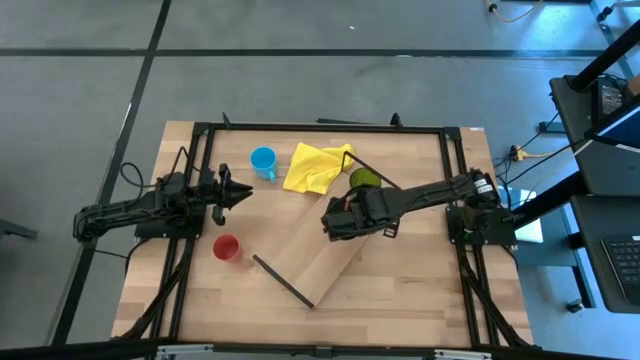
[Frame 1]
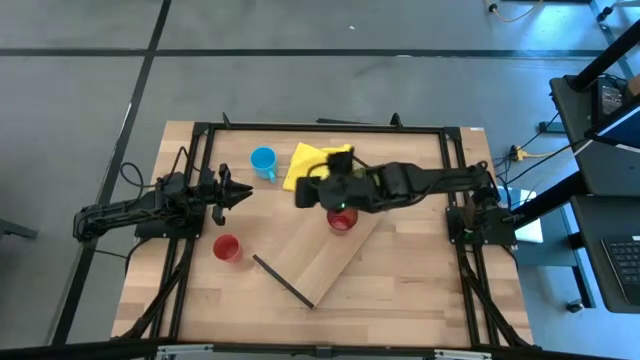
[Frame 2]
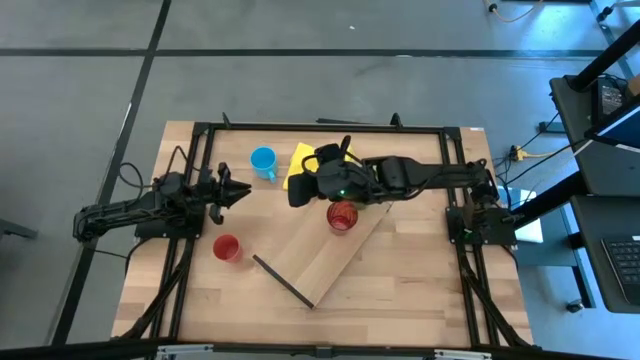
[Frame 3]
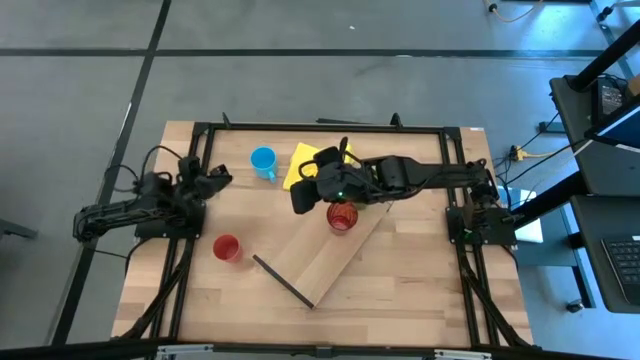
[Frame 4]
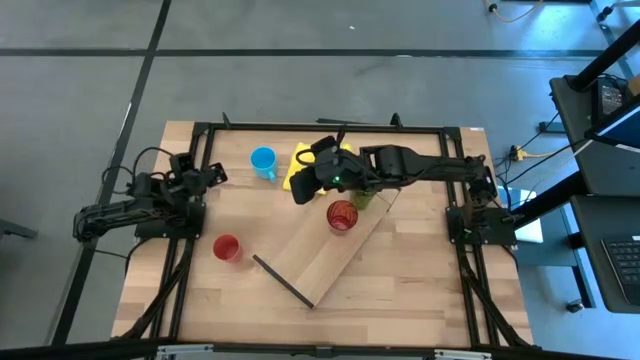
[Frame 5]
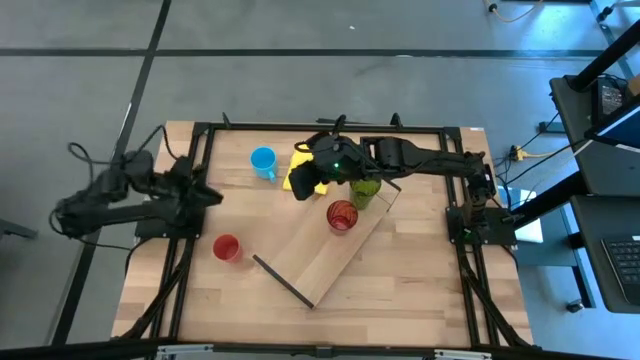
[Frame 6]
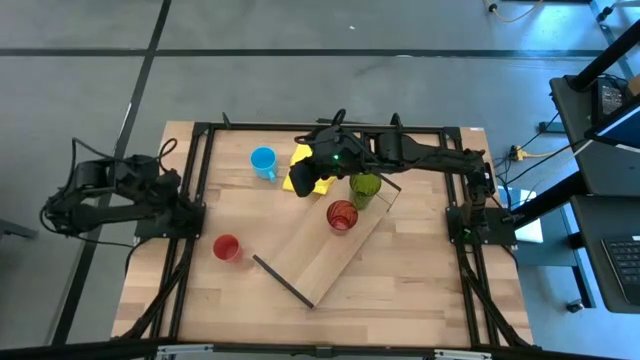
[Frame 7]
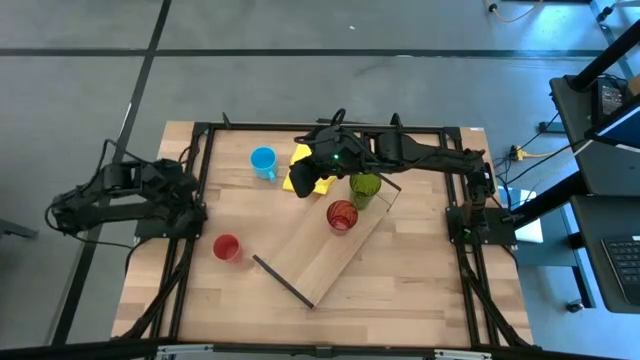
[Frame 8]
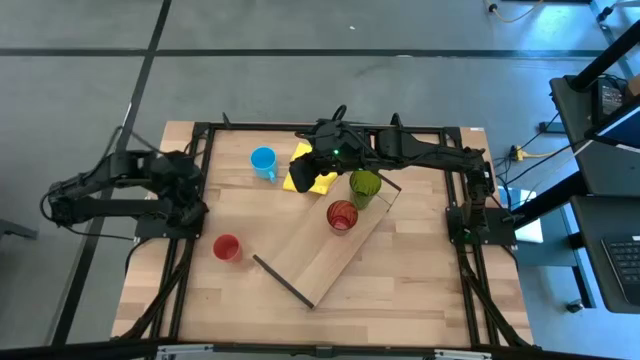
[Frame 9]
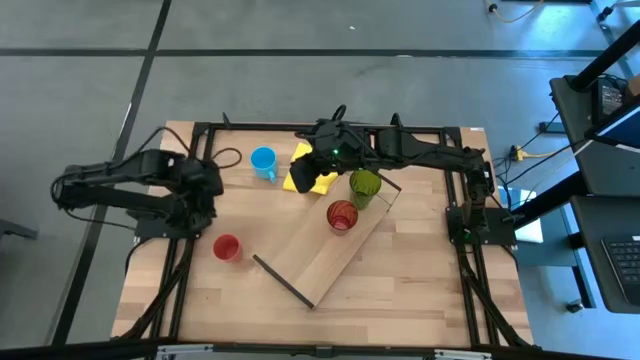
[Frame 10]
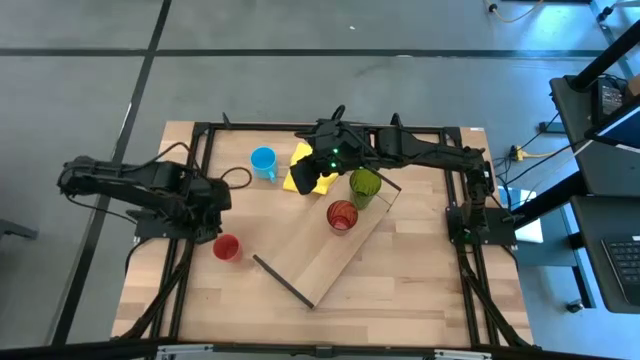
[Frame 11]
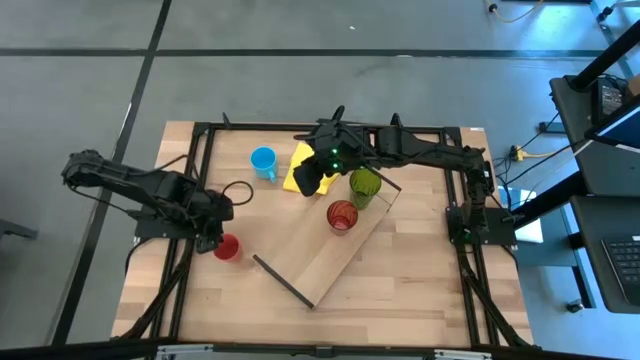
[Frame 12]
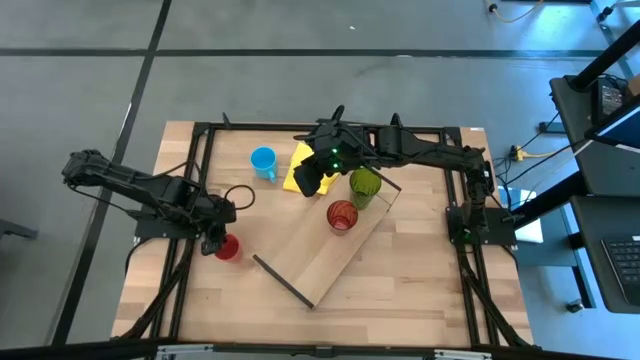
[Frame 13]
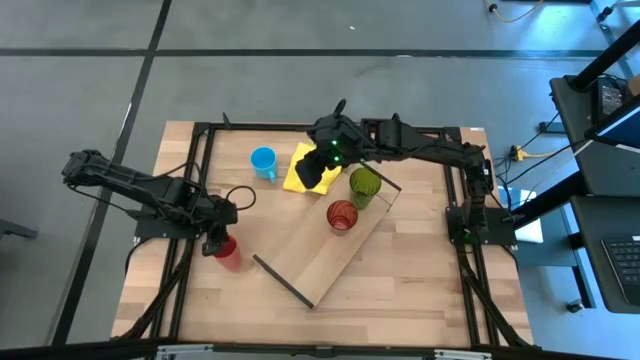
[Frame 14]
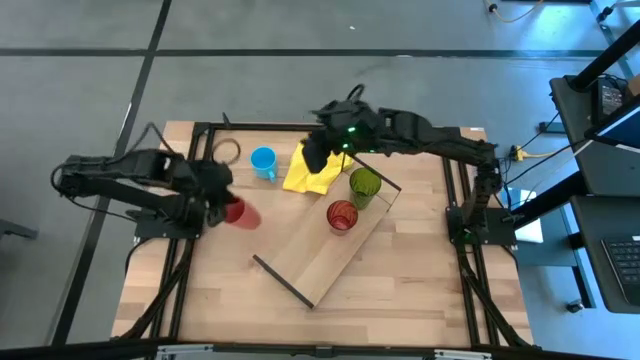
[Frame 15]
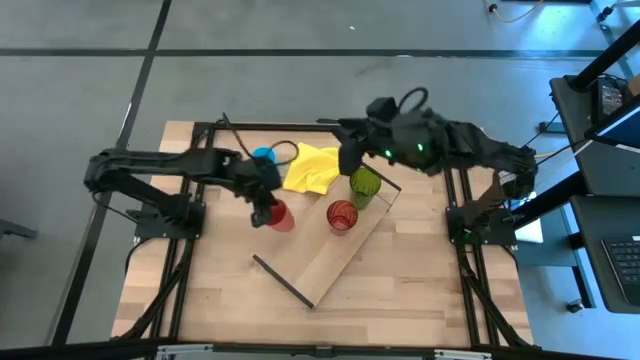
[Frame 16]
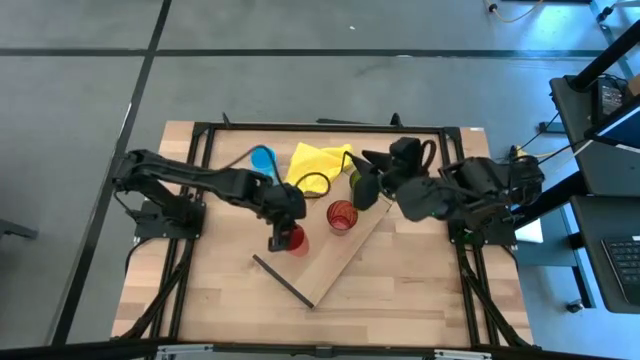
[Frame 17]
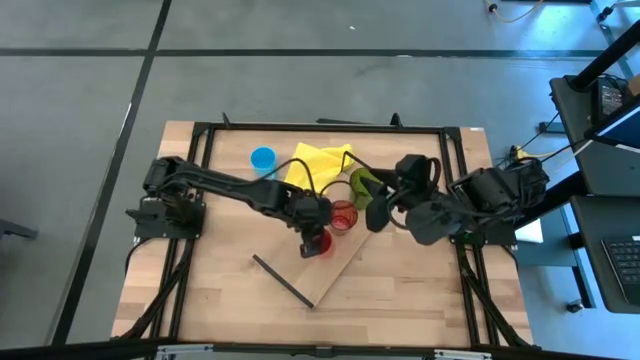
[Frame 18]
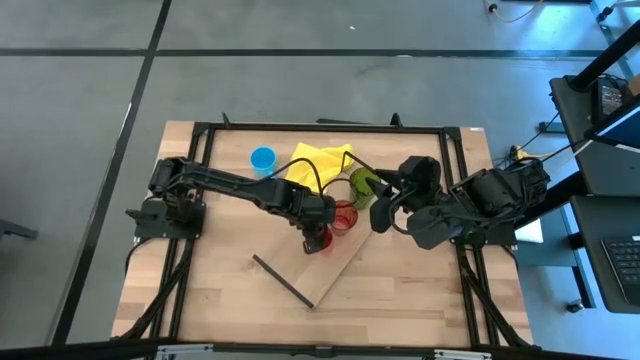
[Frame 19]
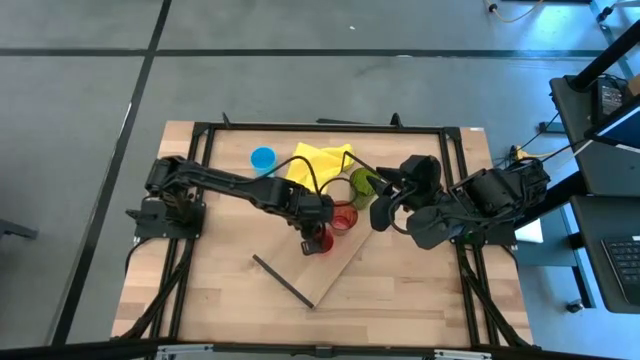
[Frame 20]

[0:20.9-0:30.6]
Task: Stack small to large cups/mugs on shelf
Put the orange cup on the shelf

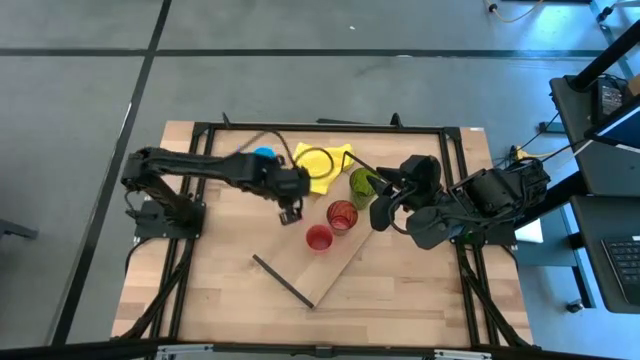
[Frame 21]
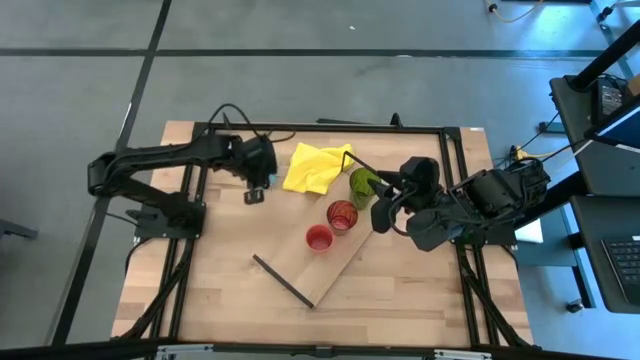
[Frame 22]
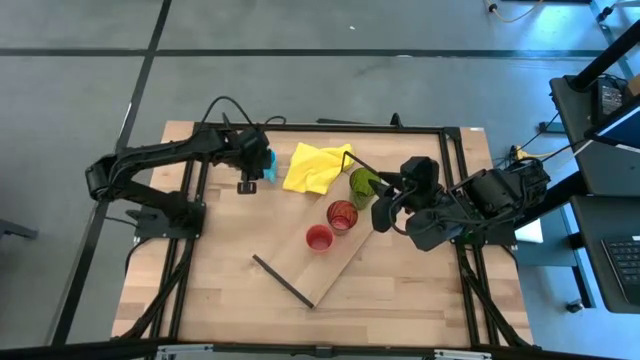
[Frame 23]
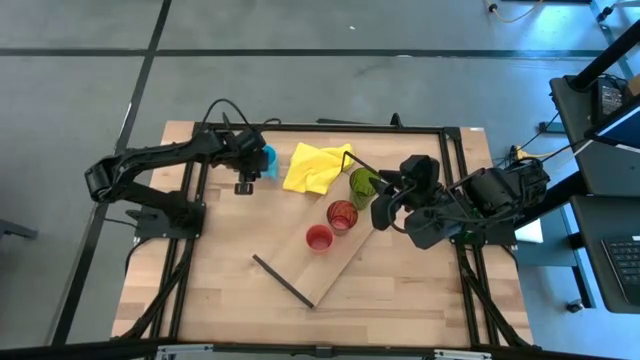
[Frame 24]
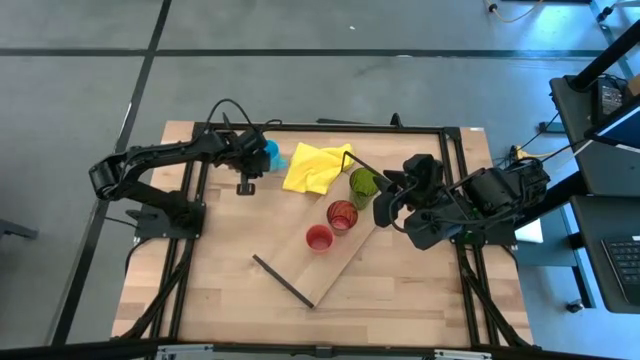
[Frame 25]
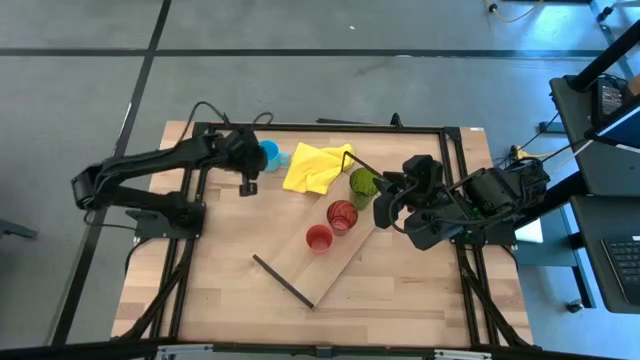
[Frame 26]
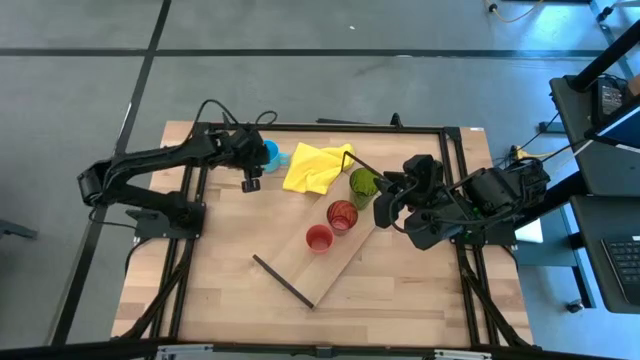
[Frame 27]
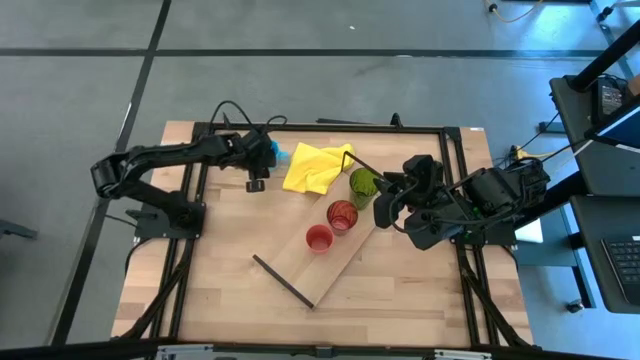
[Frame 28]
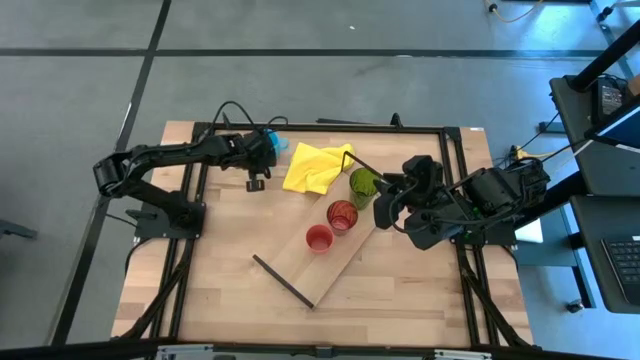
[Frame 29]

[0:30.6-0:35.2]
Put the blue mug on the shelf

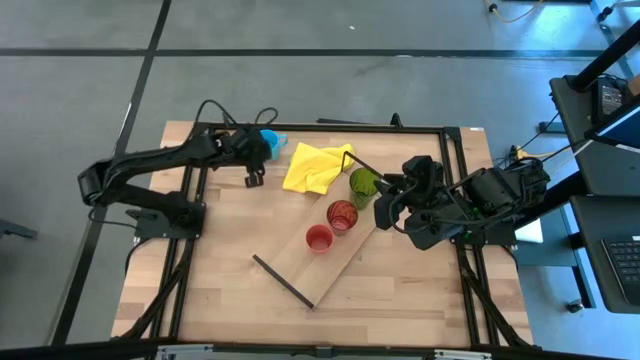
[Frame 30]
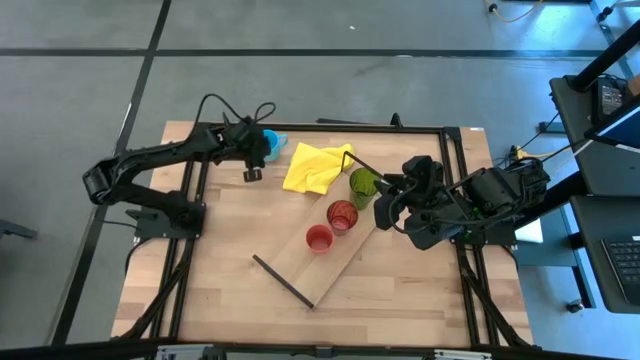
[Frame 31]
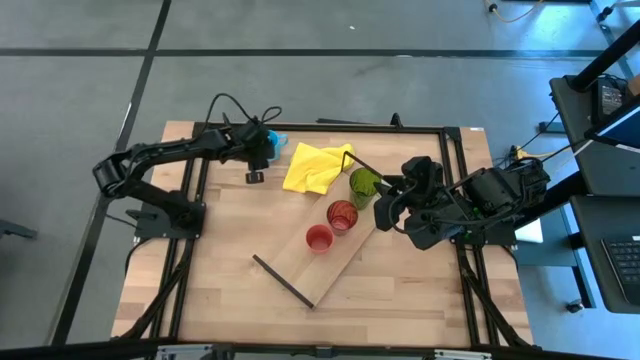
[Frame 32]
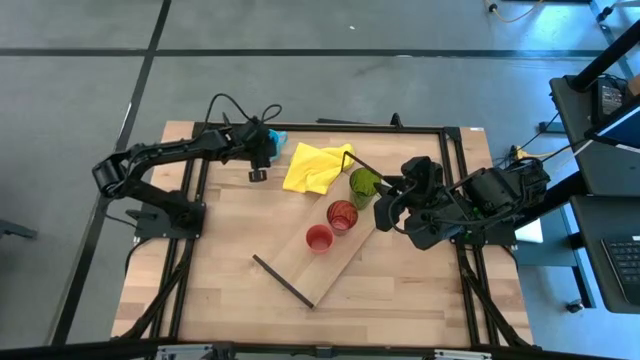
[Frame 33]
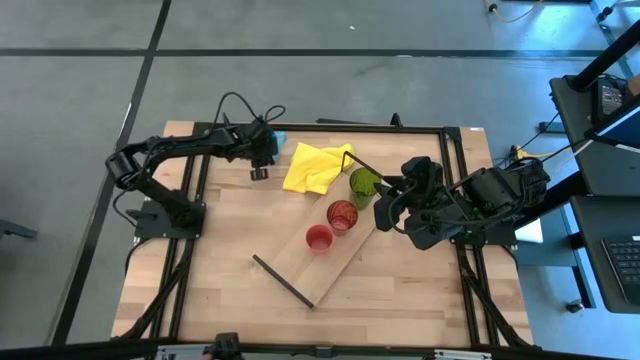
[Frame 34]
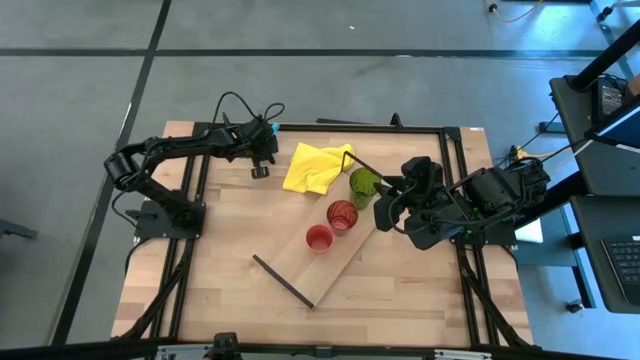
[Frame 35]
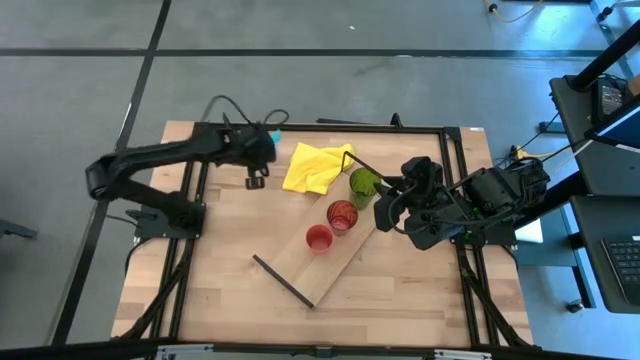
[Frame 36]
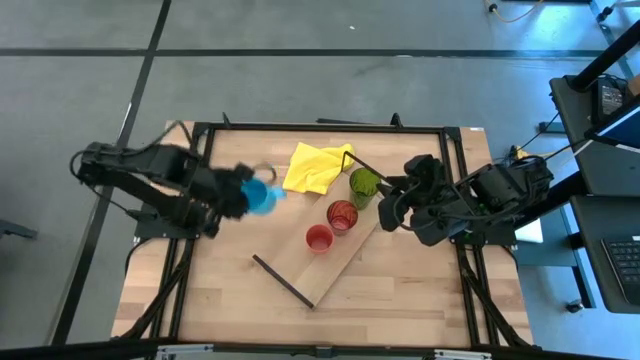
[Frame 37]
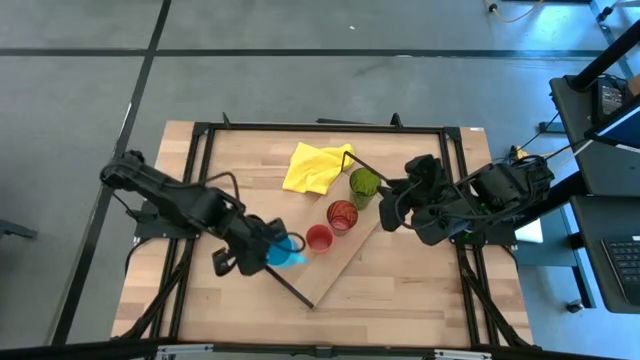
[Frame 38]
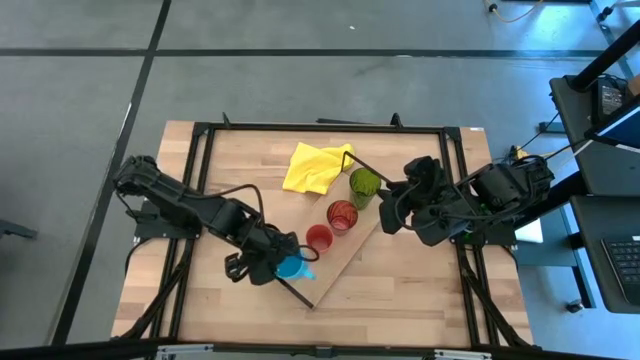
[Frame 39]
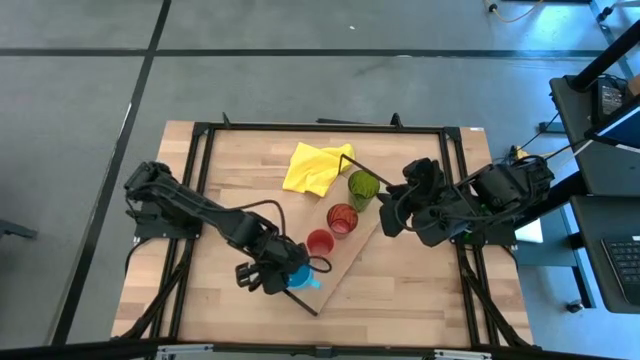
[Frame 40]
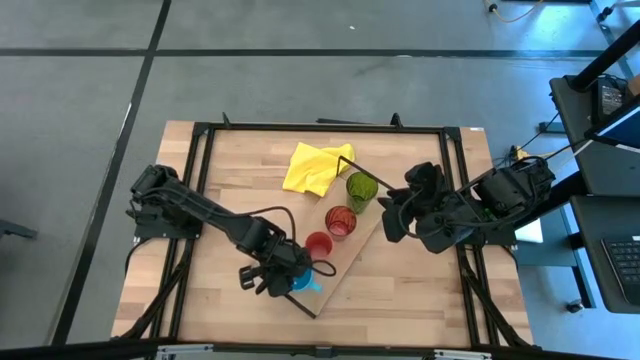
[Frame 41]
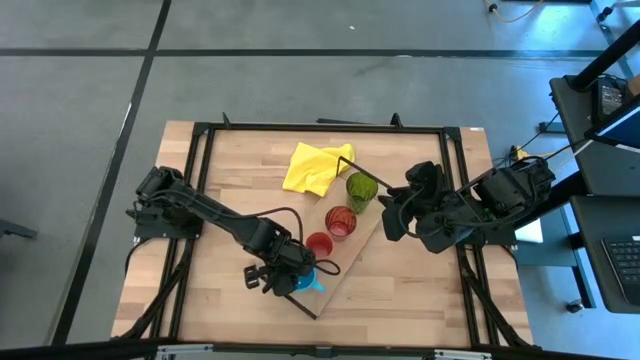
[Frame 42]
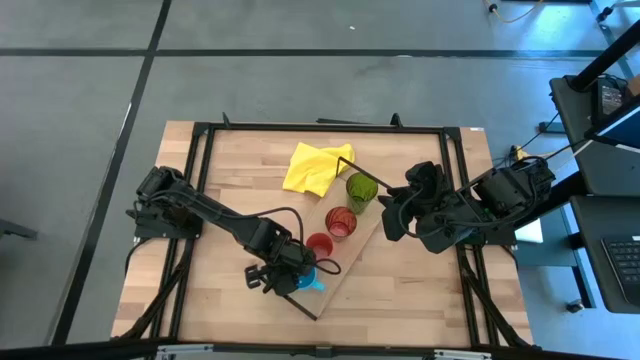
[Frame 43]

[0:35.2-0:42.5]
Put the blue mug on the shelf
